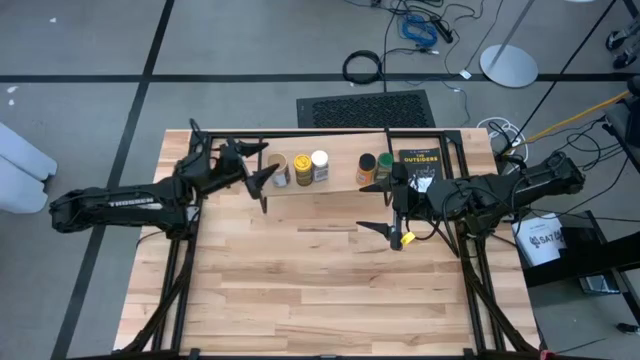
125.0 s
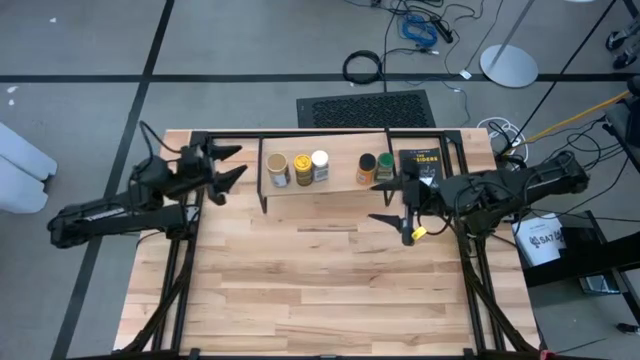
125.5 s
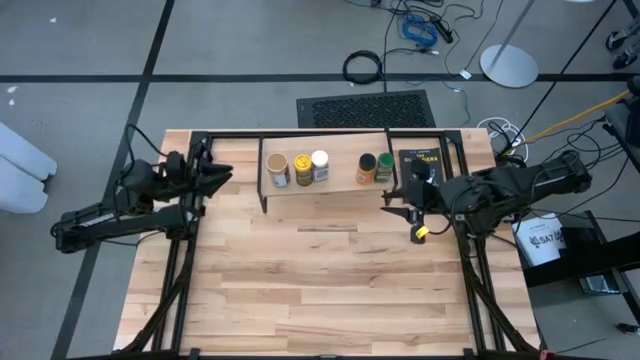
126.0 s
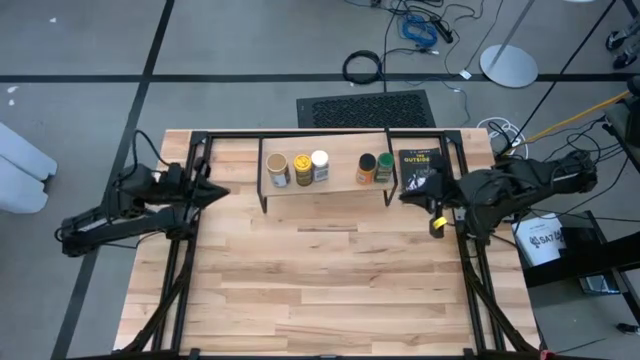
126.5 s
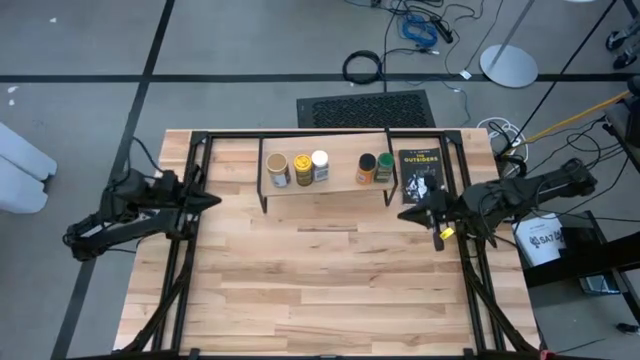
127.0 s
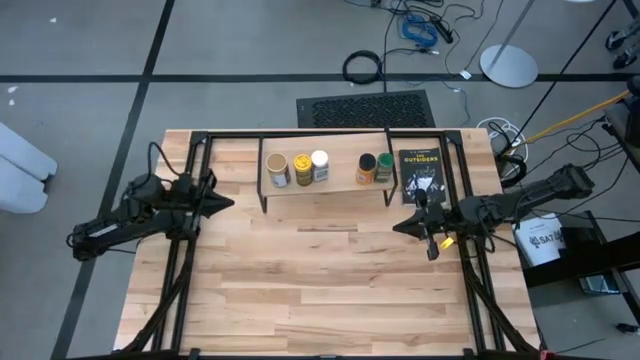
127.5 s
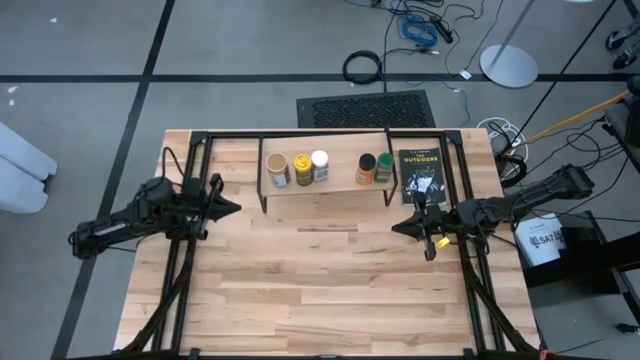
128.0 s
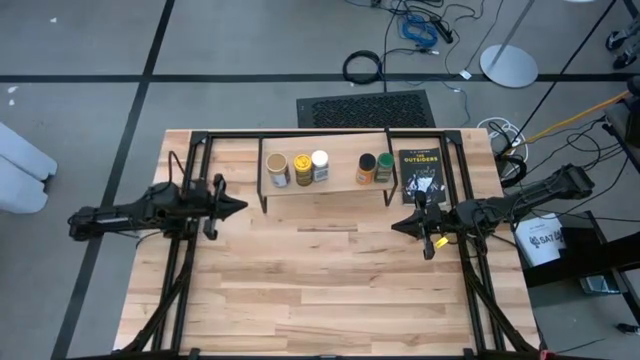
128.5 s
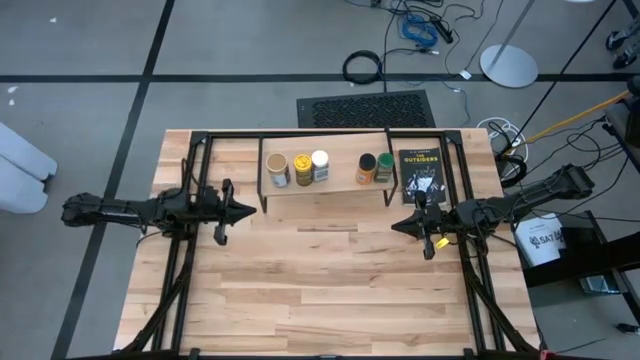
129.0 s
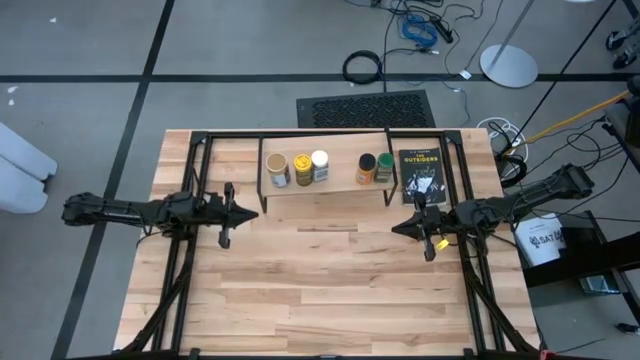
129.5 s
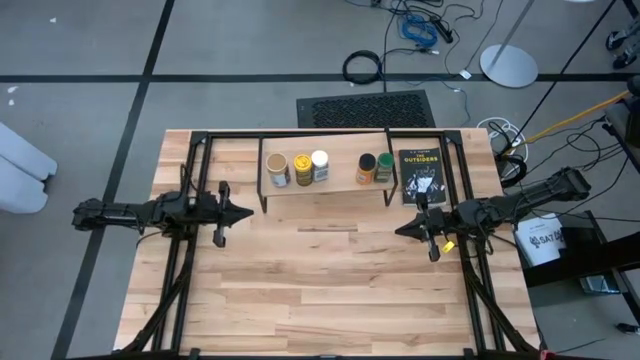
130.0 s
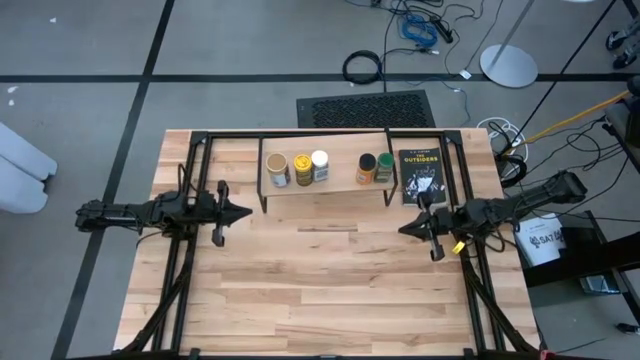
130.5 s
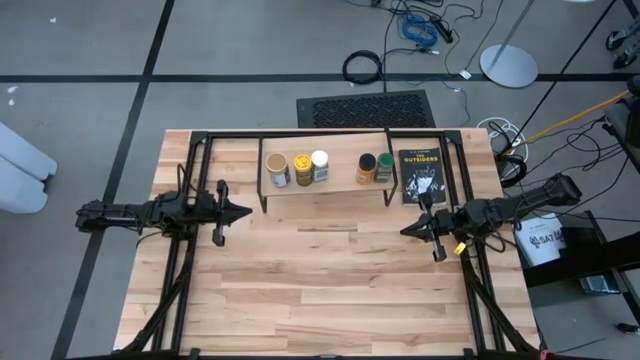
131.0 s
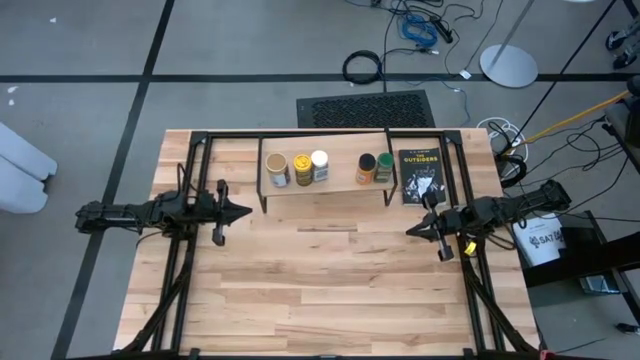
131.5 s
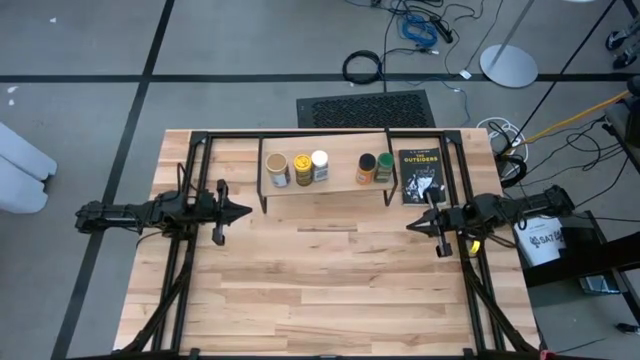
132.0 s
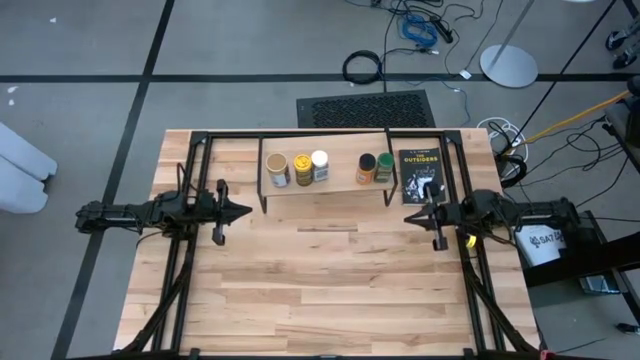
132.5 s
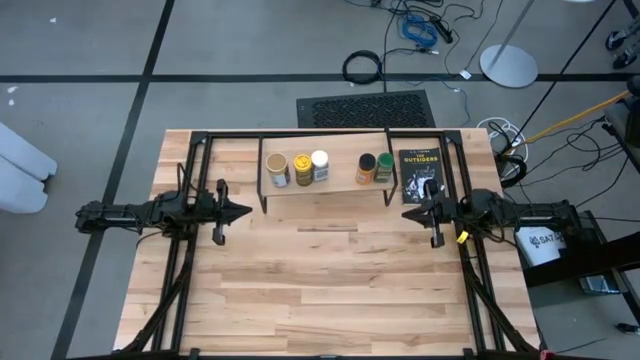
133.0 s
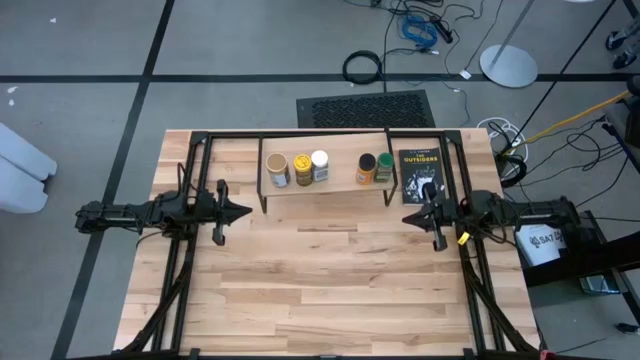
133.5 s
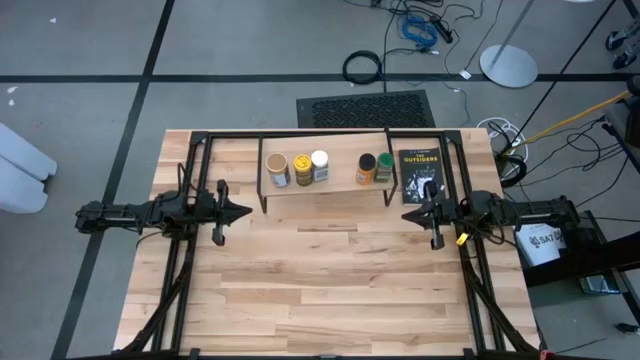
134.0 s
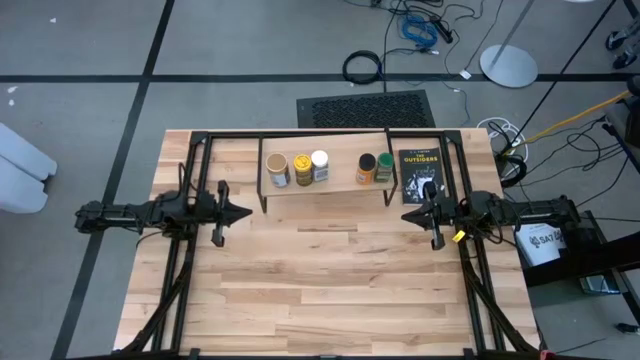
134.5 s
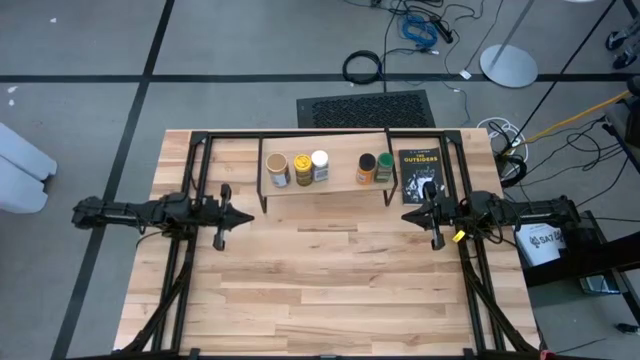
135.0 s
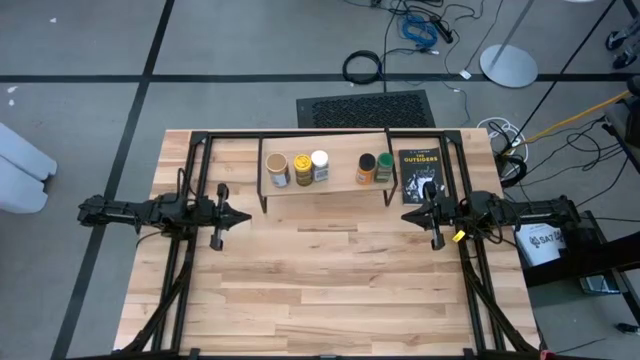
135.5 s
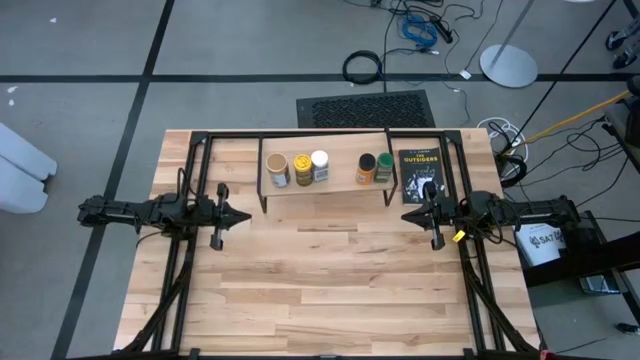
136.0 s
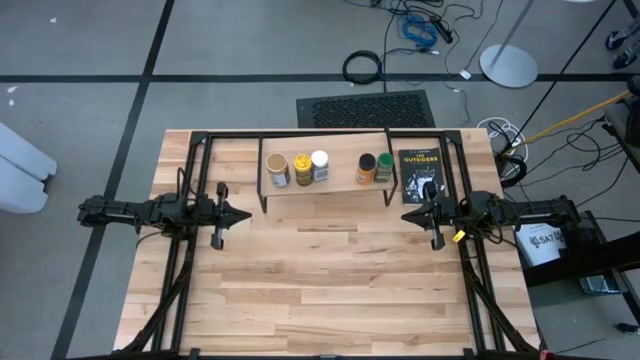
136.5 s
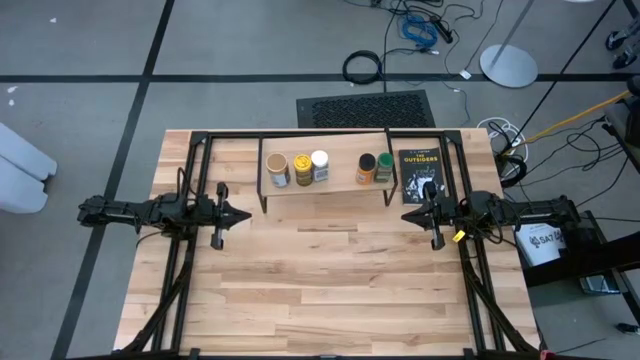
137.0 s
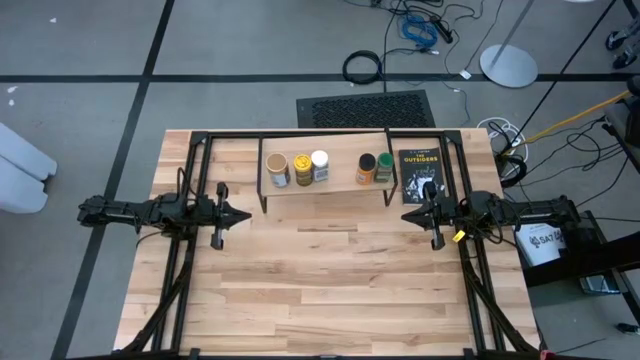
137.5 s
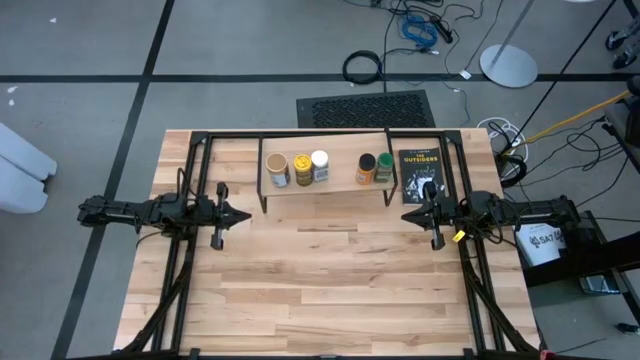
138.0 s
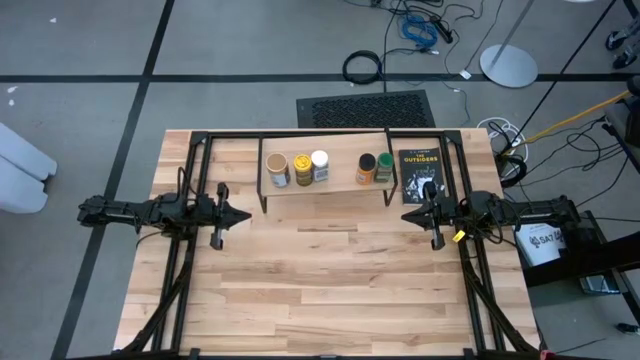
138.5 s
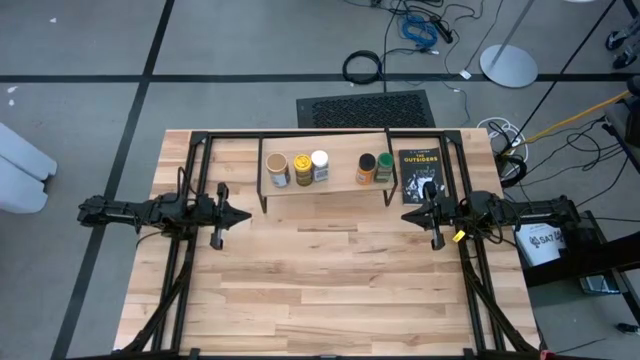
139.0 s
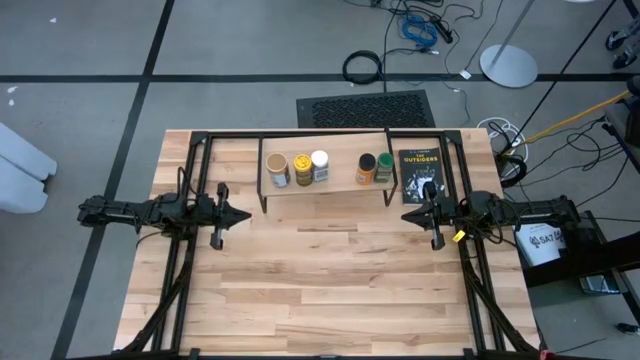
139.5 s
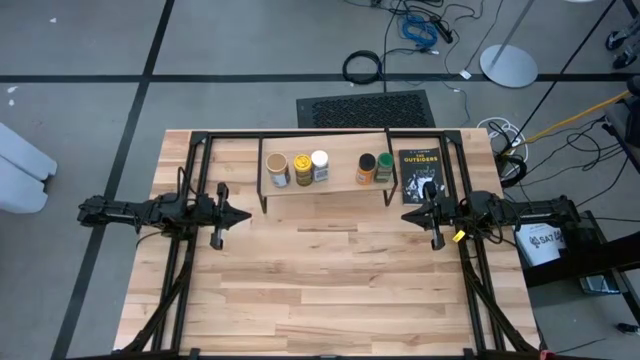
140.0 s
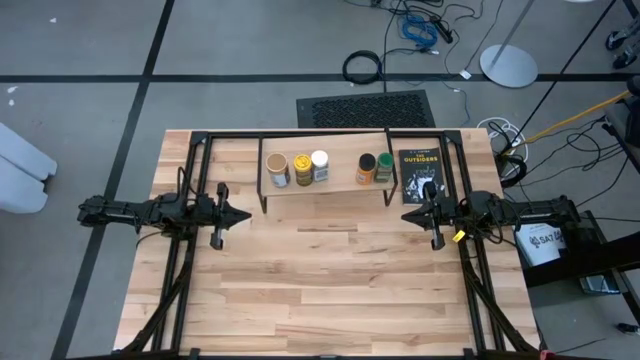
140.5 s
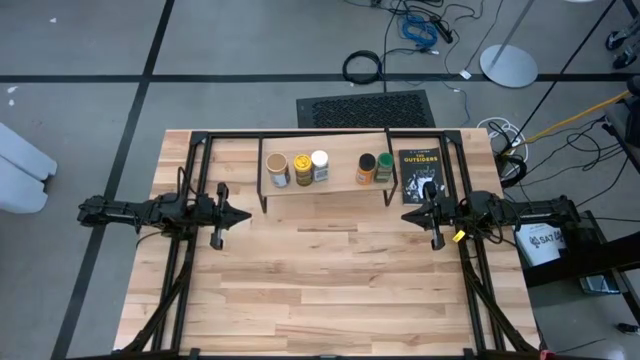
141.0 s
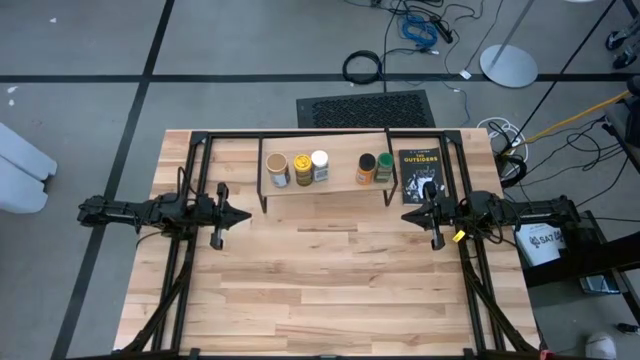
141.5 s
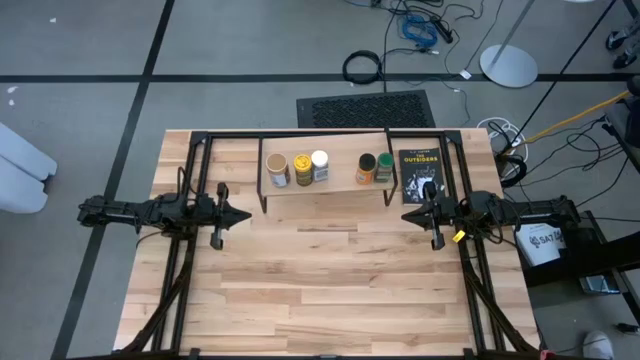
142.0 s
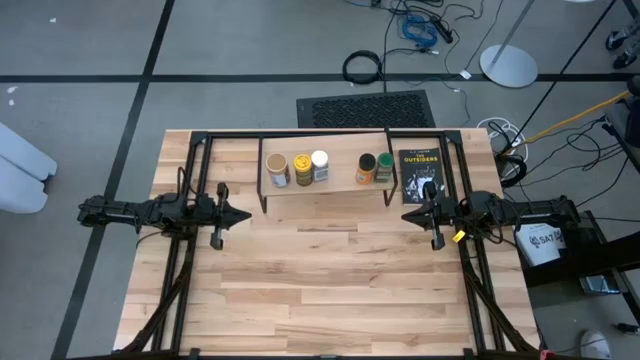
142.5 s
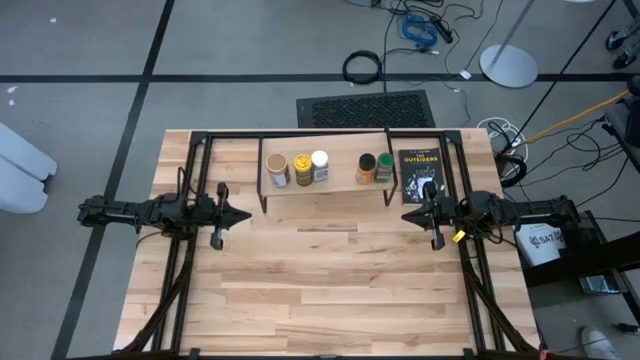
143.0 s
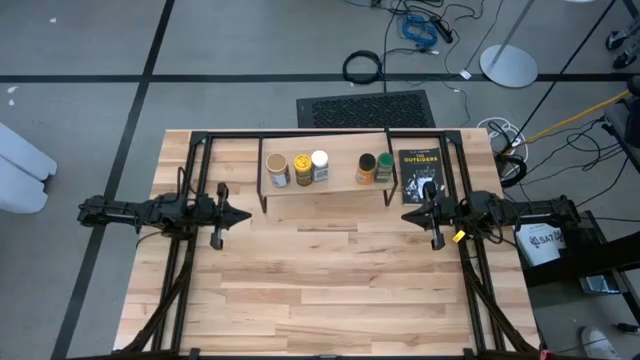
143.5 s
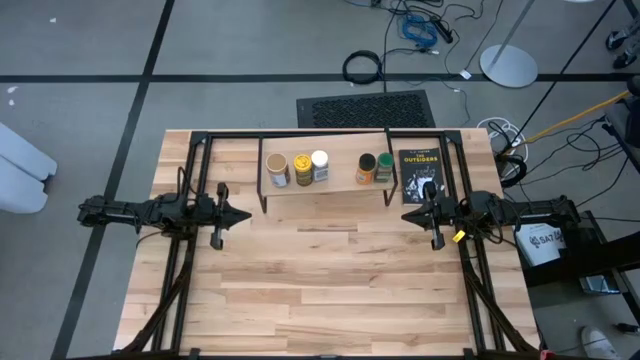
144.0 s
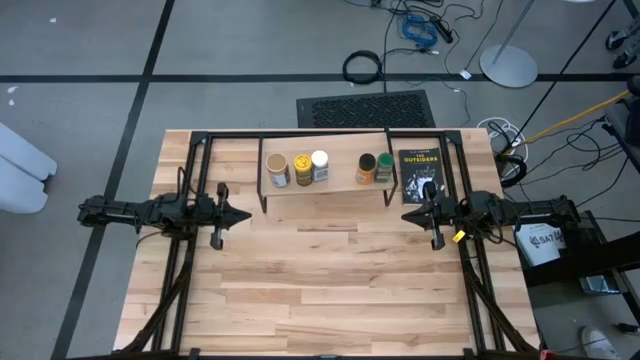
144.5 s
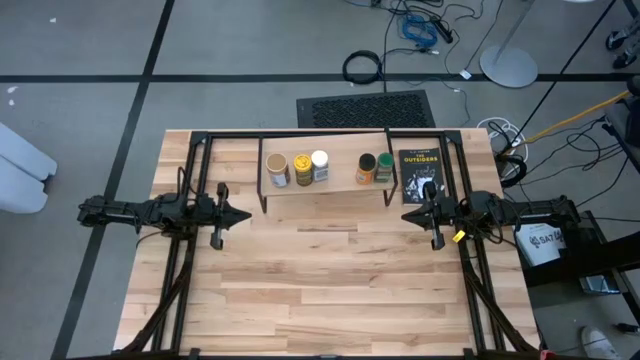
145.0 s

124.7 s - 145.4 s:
Task: Shelf spices
Return to Home Position
